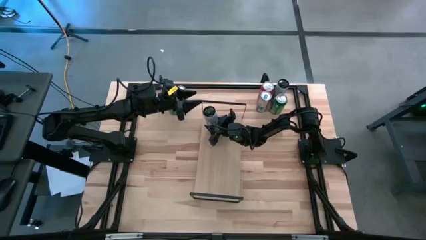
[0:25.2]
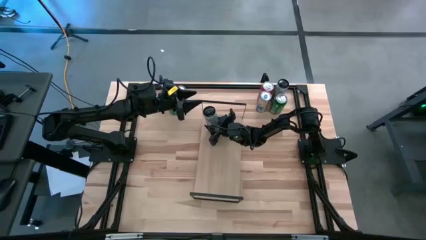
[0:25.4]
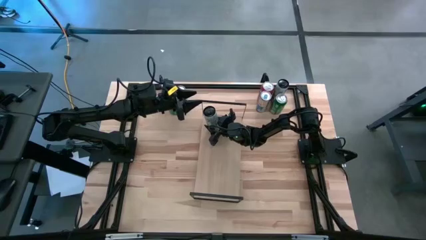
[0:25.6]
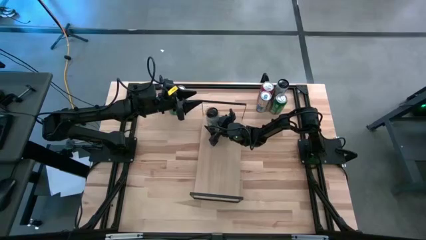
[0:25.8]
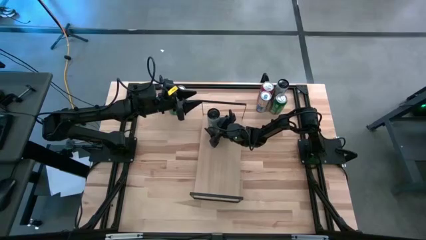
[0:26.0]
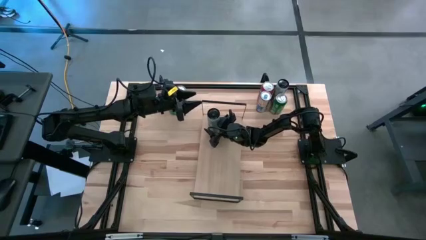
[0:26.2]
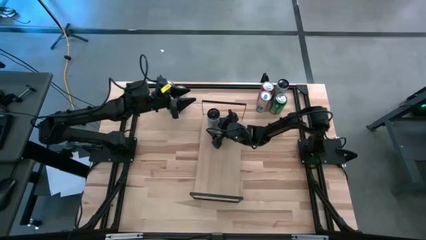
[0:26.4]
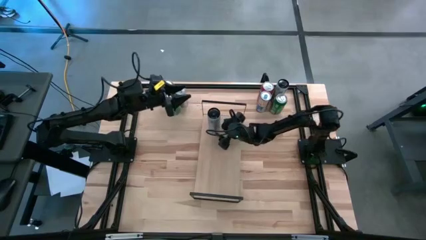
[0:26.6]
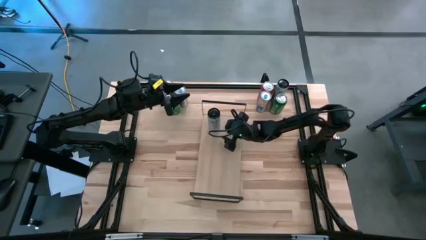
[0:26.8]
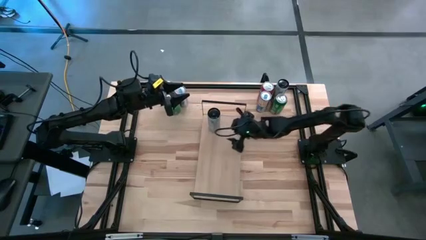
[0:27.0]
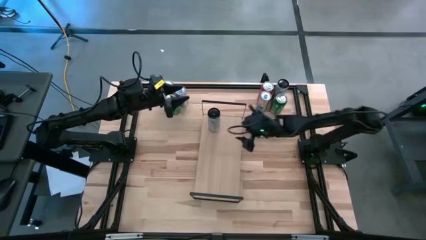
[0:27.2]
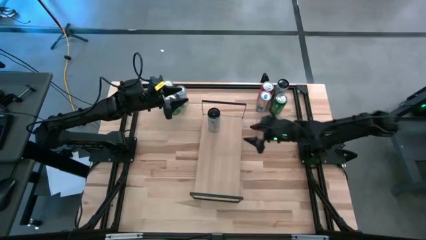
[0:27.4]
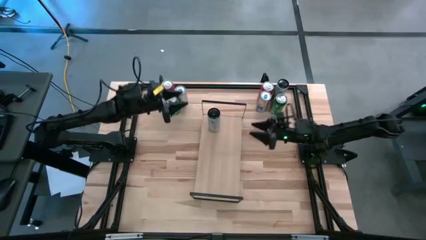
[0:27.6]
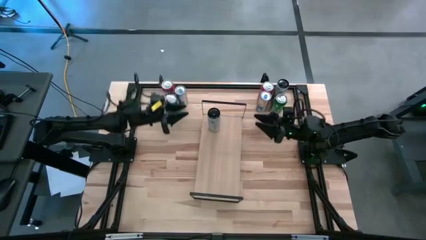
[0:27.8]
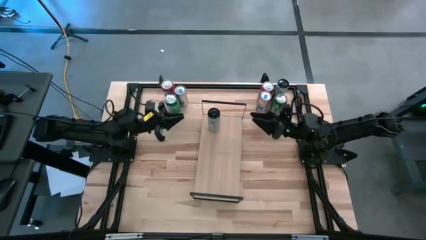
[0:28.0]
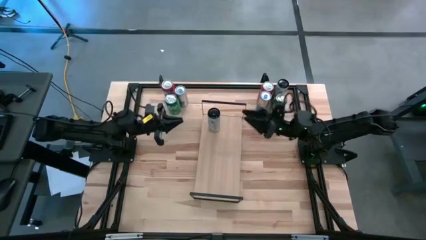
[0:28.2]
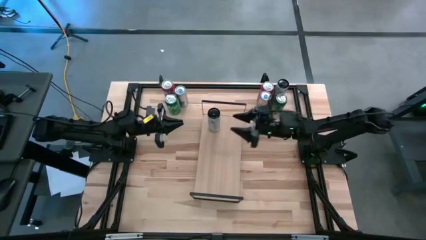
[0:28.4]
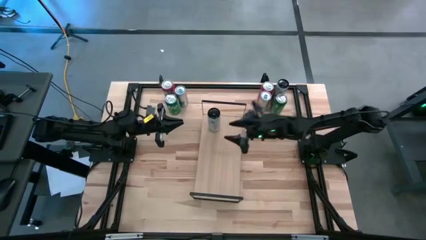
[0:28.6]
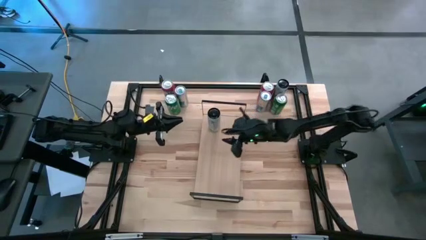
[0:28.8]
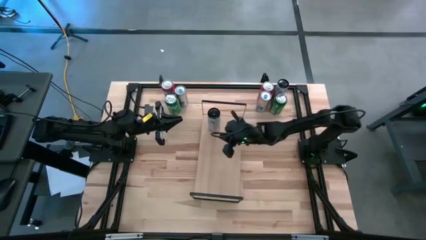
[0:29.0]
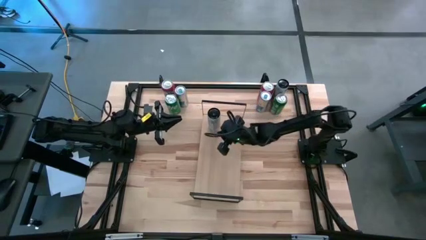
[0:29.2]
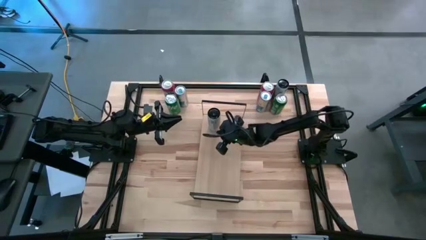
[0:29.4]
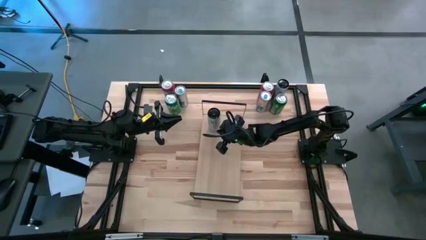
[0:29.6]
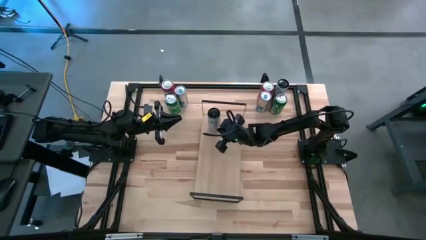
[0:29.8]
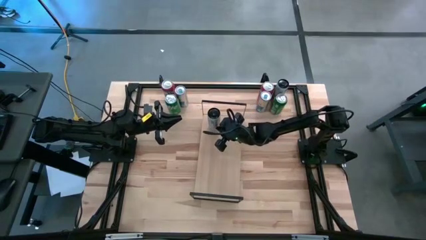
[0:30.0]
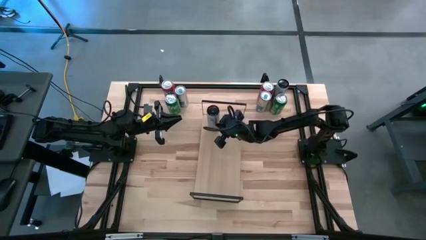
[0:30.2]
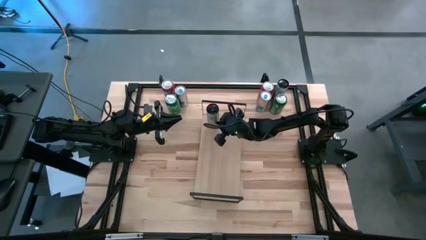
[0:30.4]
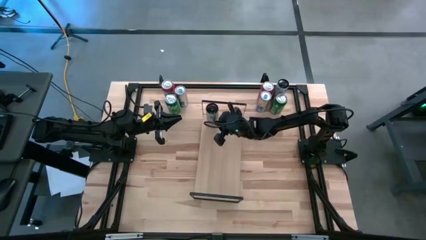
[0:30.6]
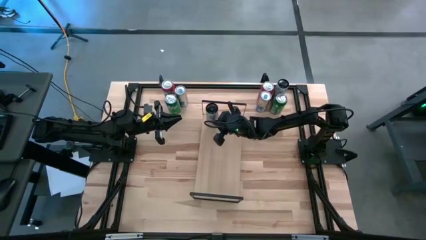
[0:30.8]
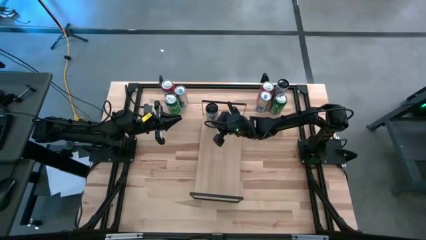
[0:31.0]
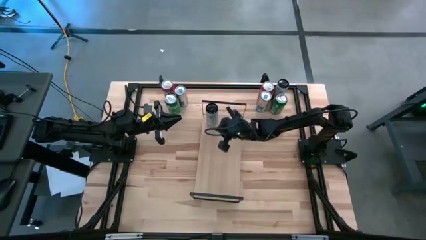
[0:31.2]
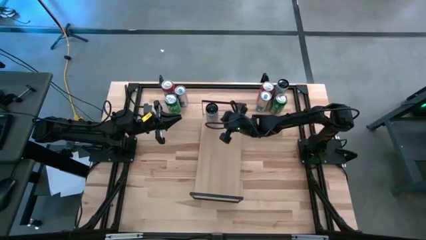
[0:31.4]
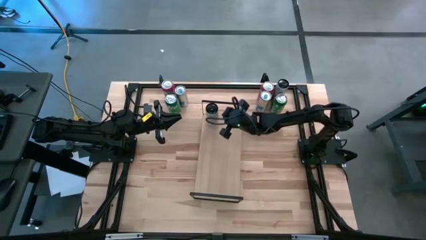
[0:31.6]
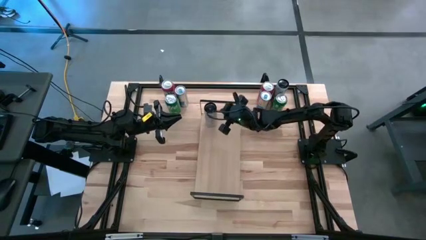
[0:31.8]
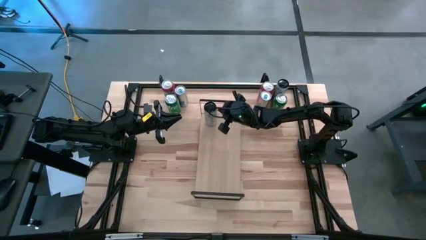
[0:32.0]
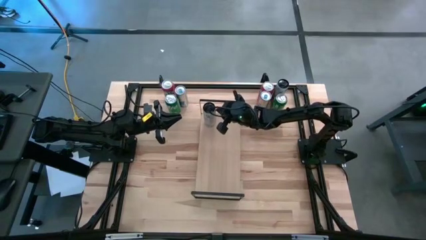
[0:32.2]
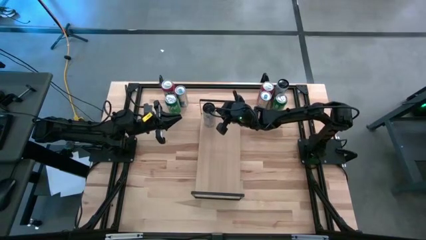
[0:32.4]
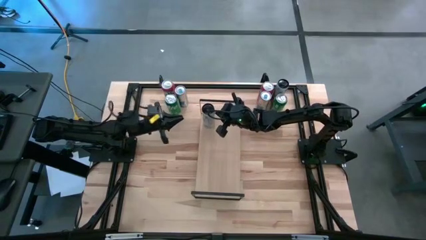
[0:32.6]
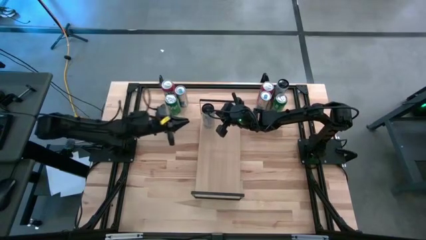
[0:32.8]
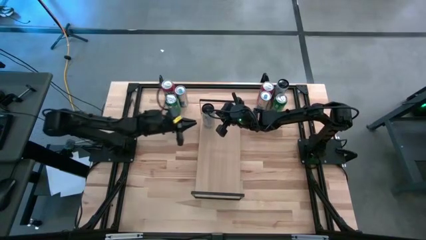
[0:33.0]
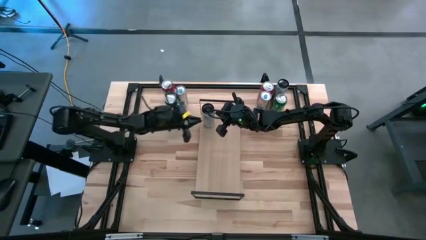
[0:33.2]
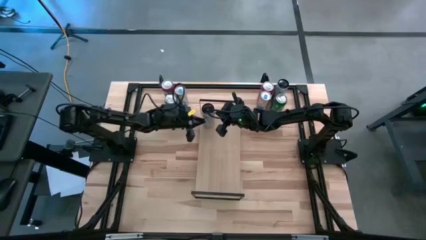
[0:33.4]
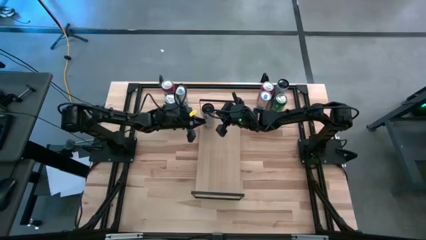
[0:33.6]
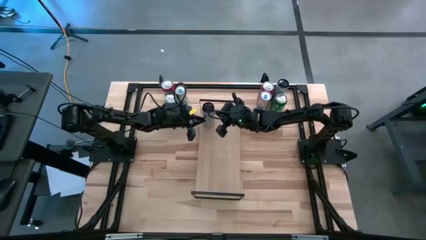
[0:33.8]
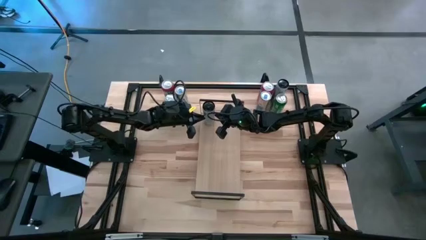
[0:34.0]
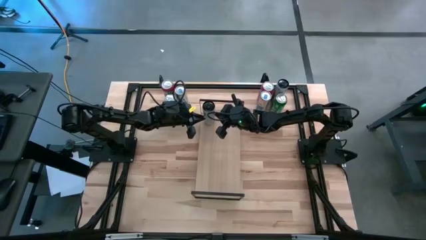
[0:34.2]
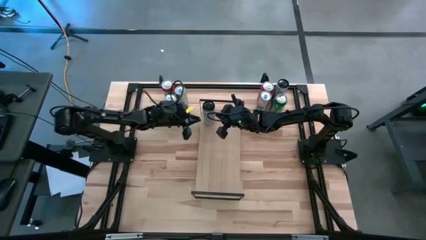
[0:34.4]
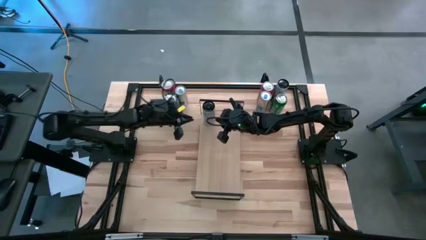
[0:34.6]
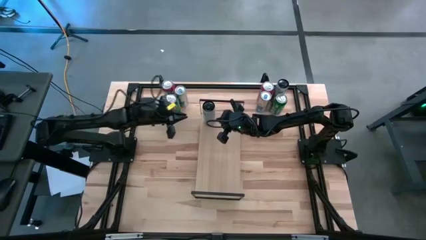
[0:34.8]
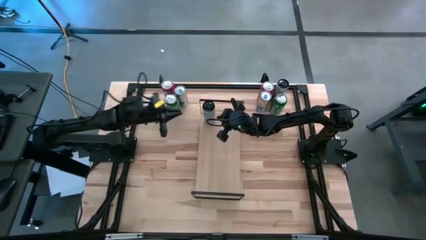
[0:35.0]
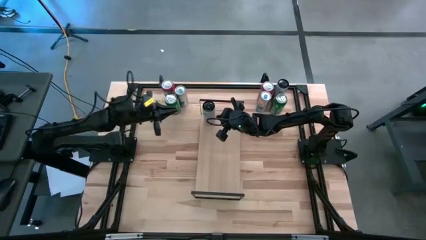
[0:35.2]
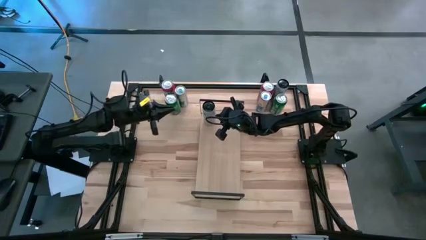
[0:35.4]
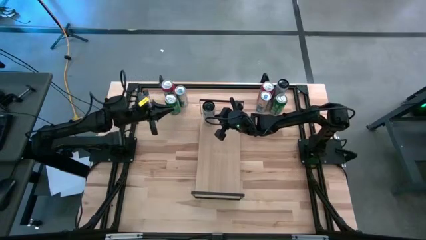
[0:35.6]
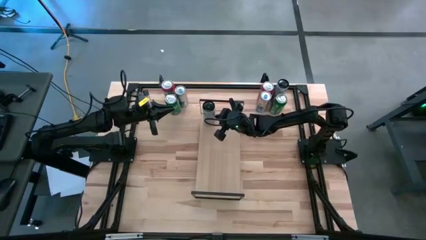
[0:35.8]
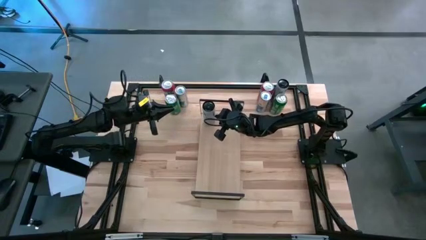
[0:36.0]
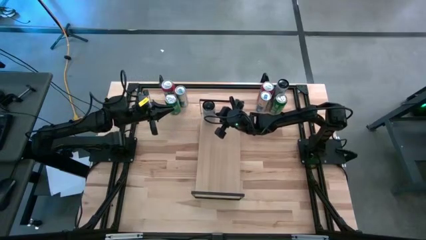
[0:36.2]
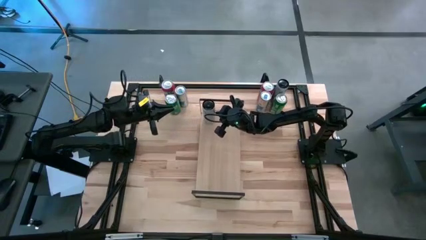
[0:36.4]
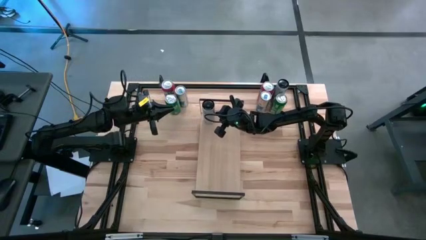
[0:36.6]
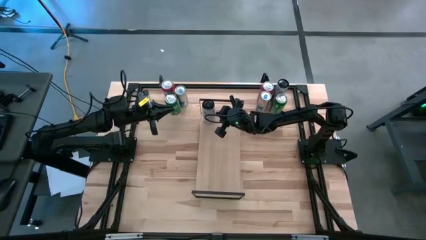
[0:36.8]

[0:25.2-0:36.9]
Task: Place canned beverage on shelf
Put the left white-pink soda can on the shelf
